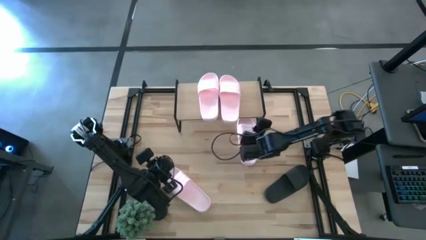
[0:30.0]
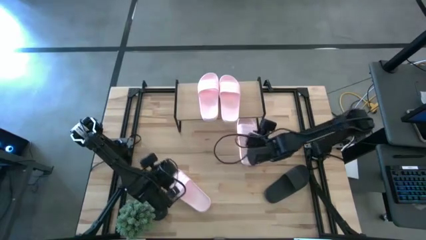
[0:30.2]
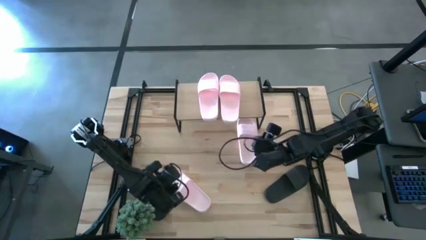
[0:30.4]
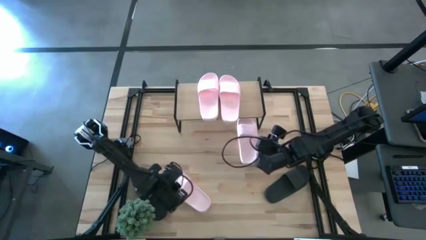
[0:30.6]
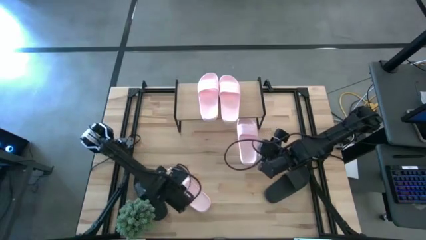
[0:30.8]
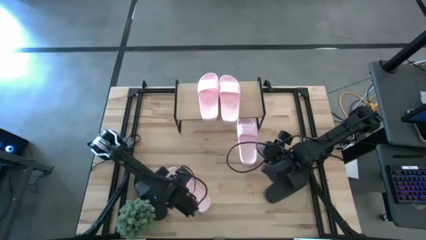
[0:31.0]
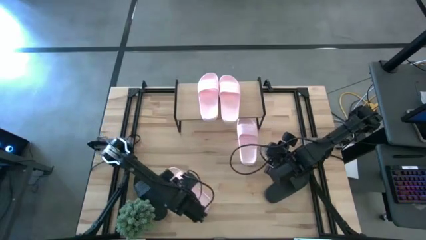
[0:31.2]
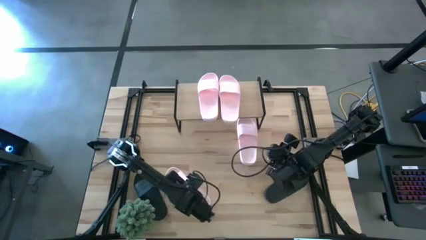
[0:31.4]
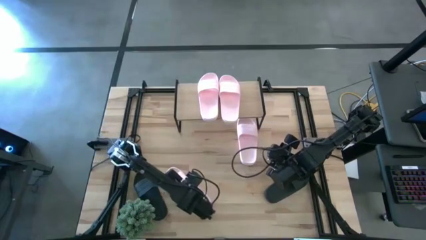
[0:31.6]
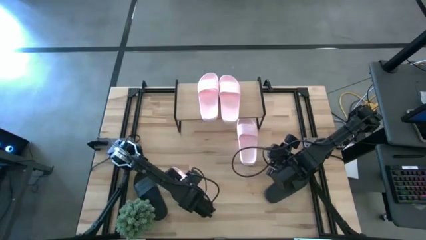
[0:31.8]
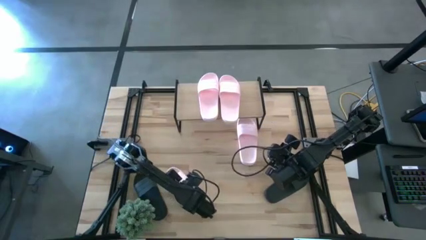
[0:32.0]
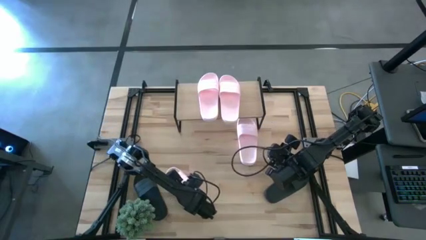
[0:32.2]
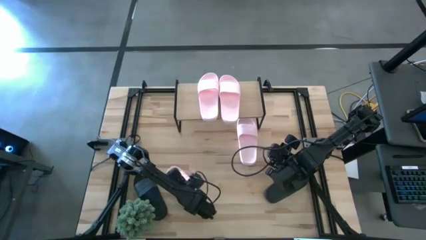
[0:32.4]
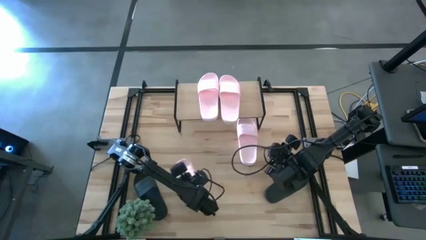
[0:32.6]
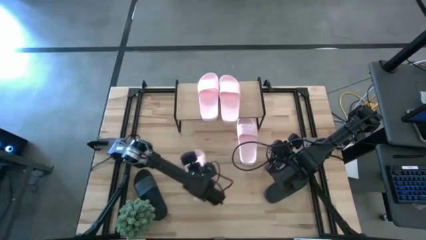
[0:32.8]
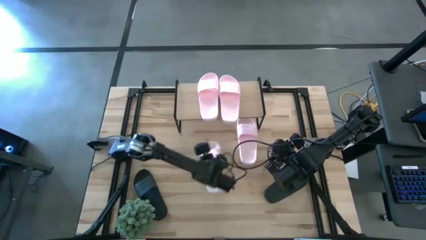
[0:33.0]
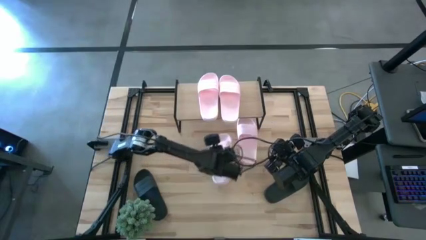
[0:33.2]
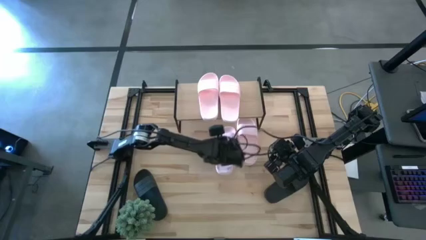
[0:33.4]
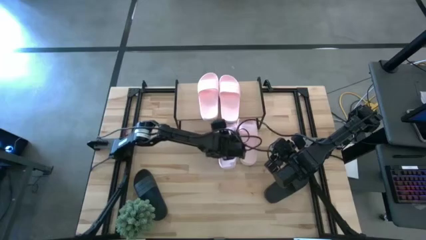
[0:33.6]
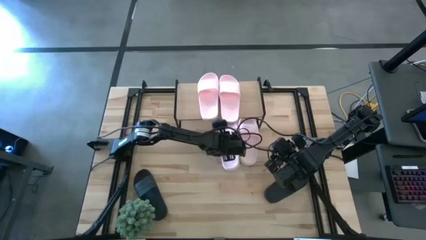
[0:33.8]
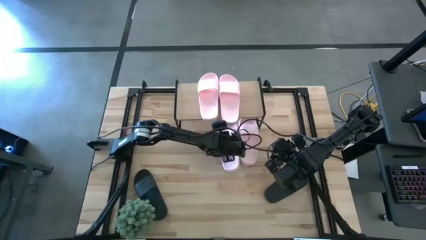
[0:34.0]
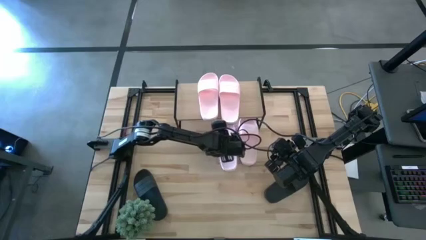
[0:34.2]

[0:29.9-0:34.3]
Task: Pick and place slides into the shelf
Put the pink sandal under the shelf

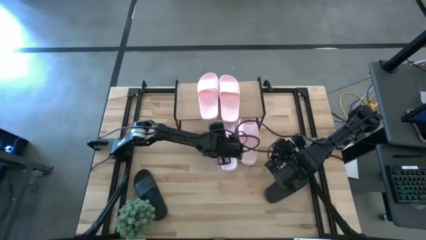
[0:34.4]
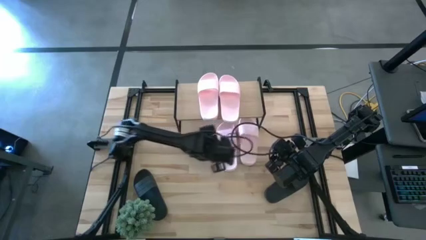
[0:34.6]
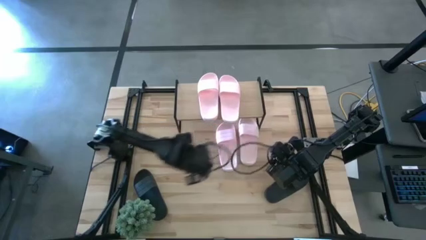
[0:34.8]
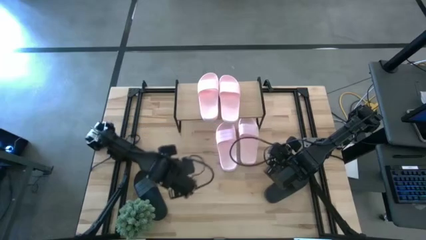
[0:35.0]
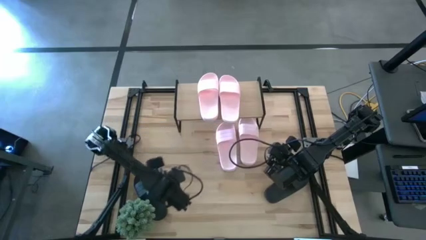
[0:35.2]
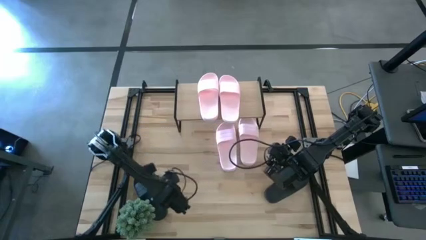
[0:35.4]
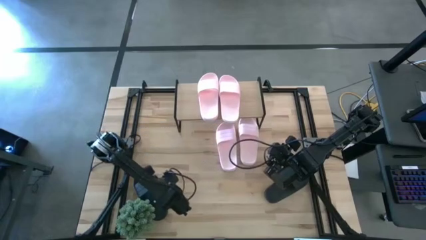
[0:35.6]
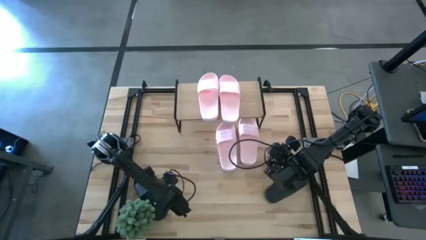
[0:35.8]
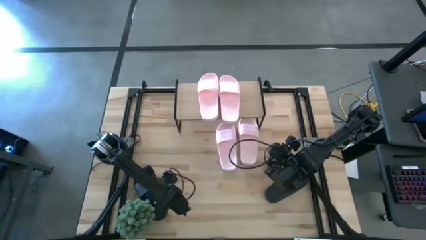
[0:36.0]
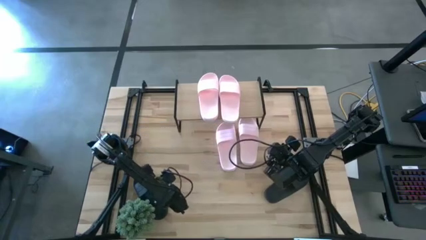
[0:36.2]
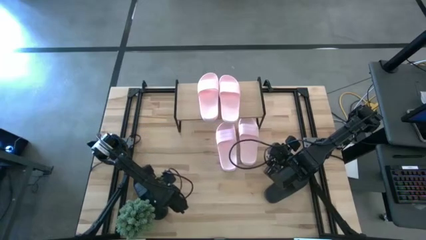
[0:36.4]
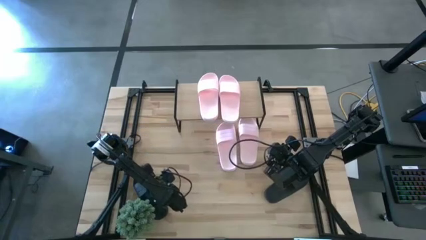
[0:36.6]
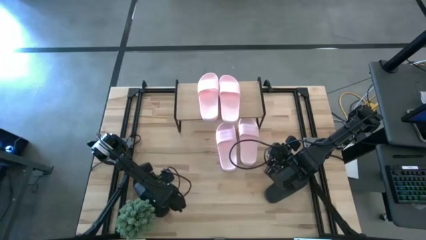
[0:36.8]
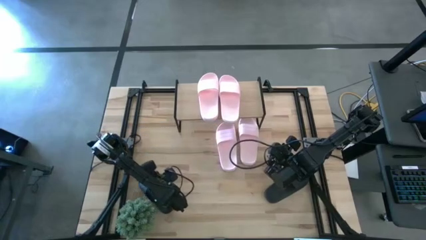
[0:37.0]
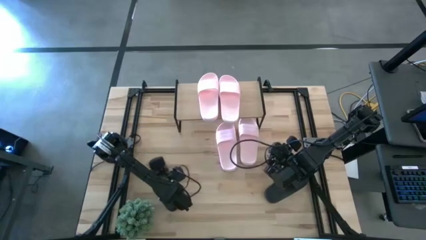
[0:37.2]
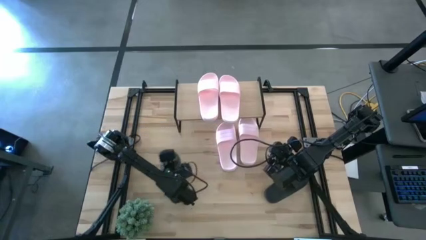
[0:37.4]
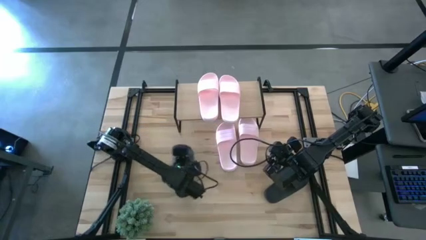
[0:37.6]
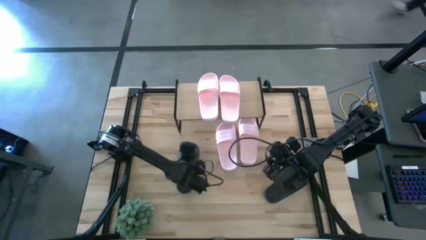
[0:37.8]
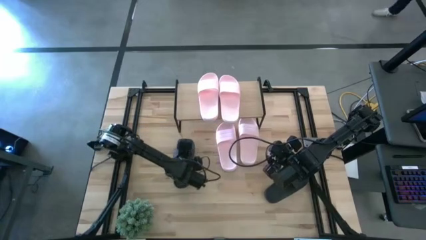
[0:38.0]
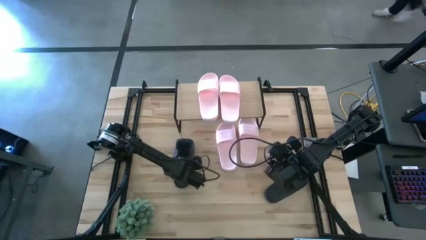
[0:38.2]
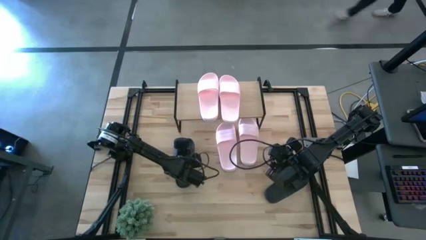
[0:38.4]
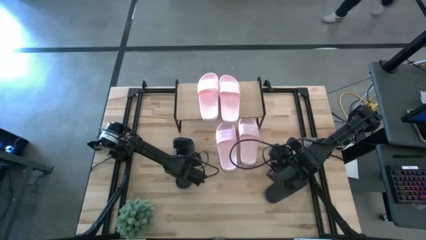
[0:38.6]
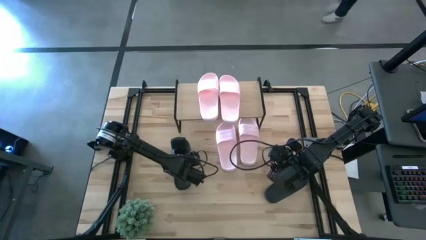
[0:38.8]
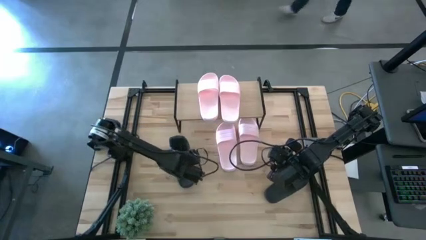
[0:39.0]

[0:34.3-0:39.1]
Put the left black sandal under the shelf

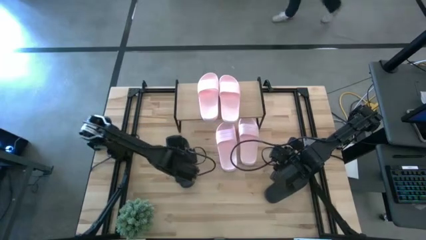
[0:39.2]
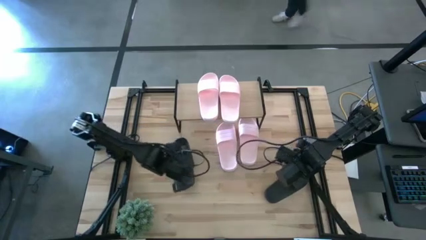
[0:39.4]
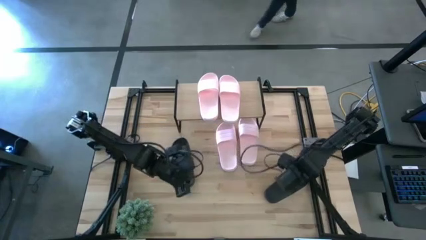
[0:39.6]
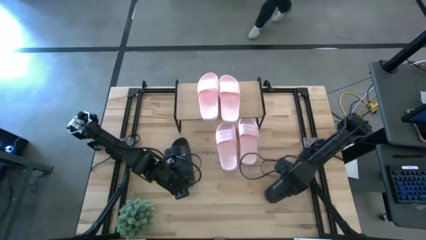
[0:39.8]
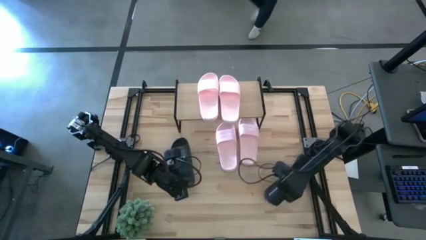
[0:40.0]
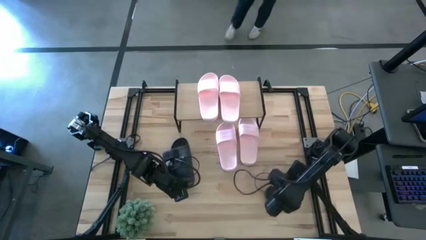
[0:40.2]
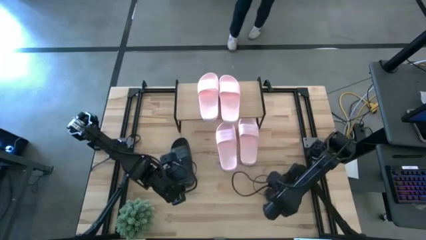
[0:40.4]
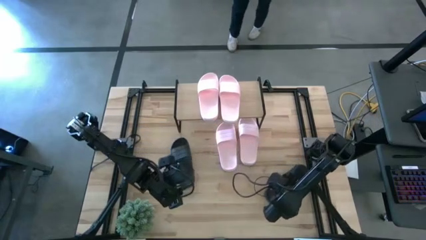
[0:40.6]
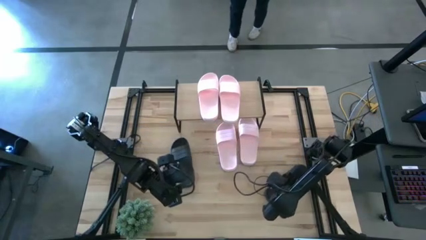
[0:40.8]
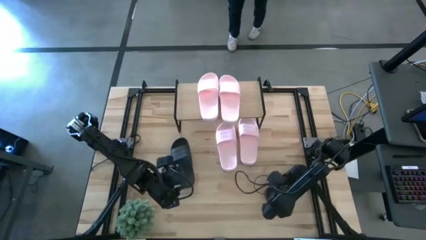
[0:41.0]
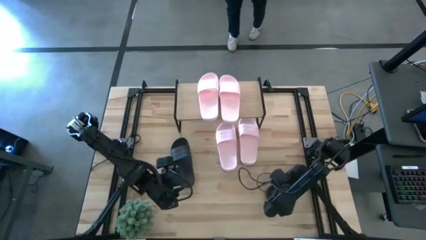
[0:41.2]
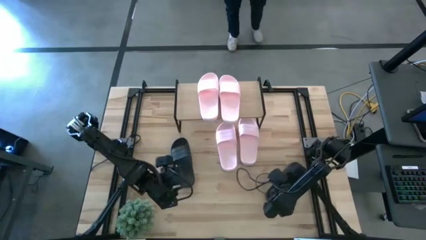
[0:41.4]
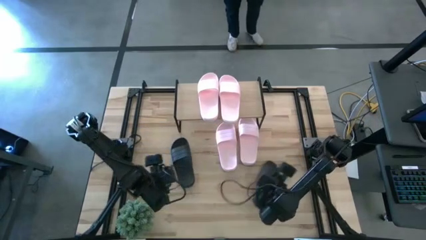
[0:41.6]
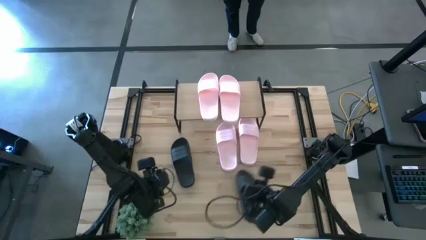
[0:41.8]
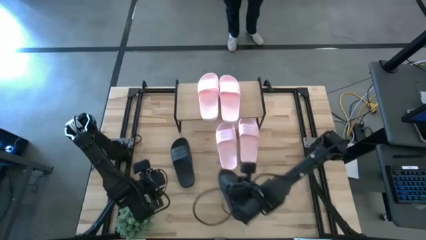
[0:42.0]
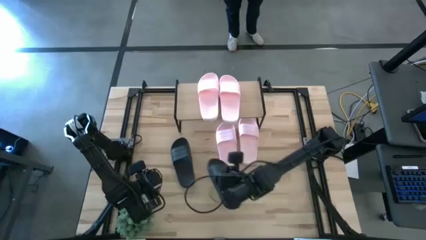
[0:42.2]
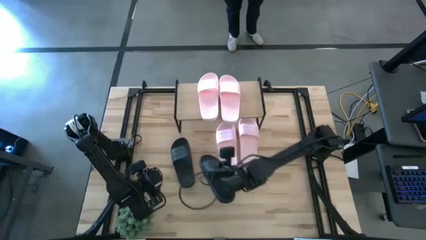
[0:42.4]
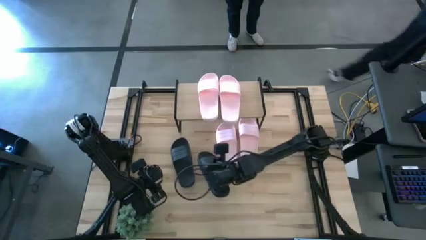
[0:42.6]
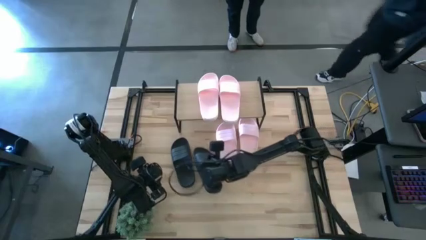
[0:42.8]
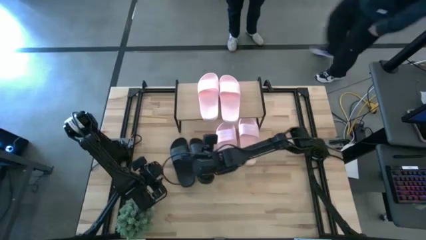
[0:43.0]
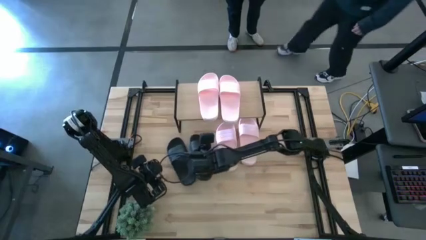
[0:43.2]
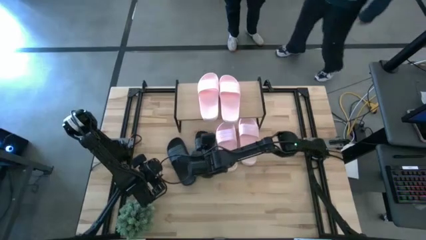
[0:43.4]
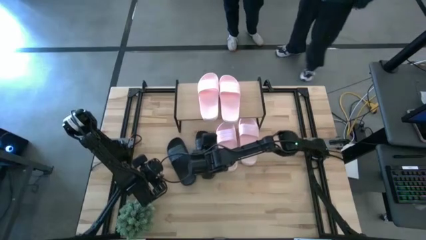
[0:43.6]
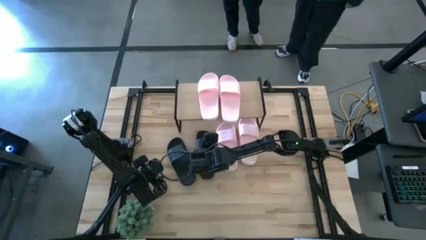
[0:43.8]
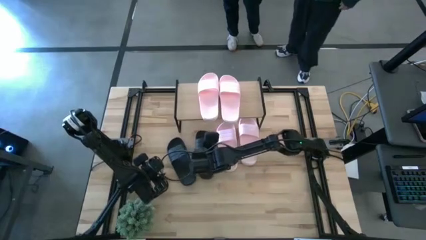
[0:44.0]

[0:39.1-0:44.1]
Put the right black sandal under the shelf
